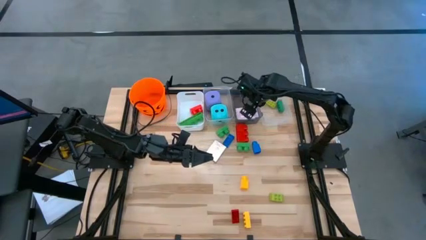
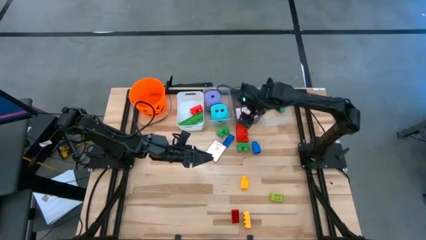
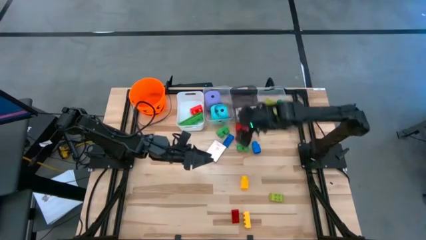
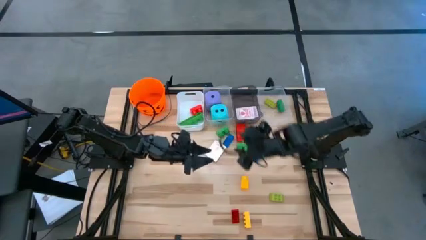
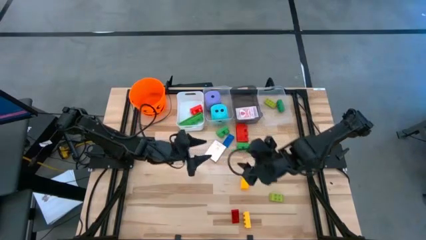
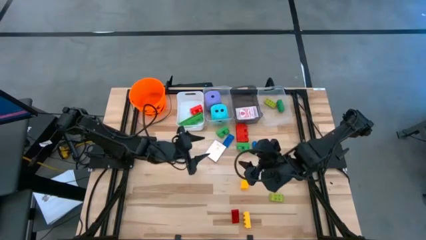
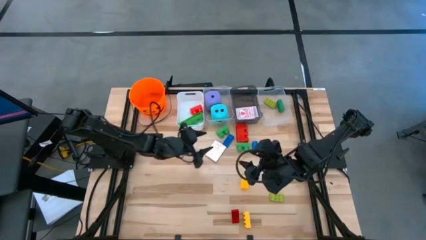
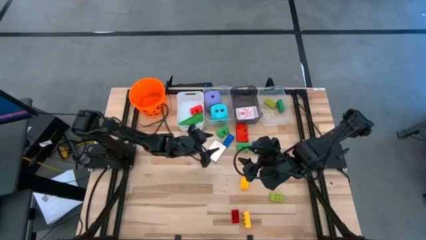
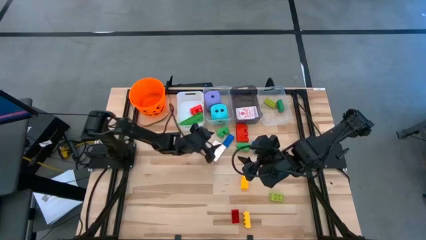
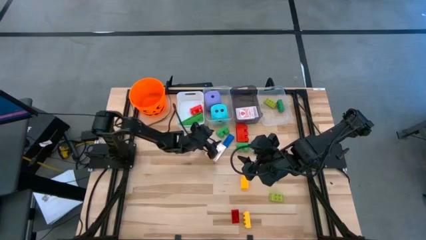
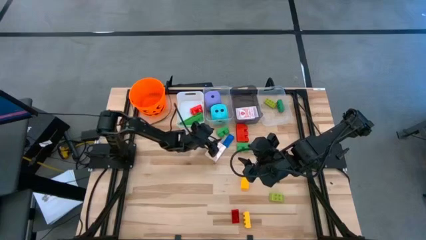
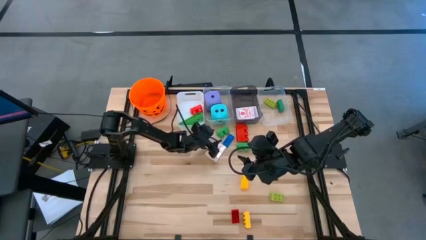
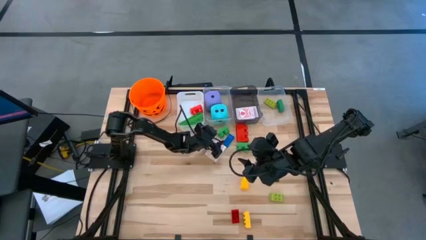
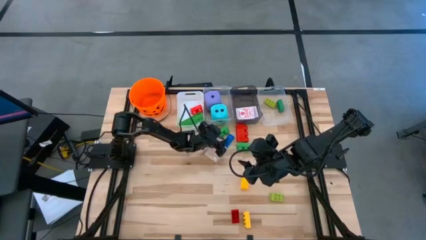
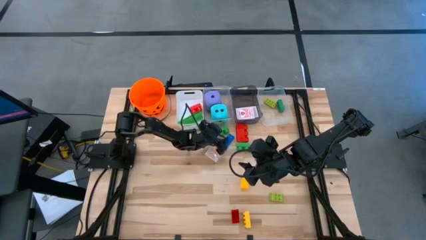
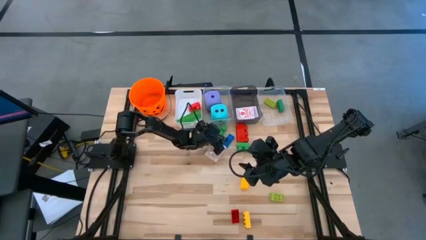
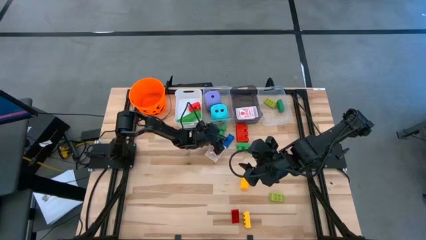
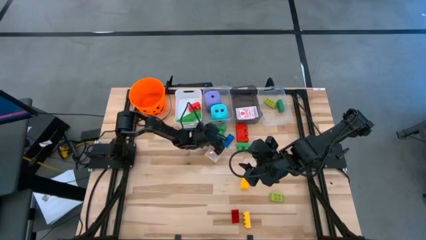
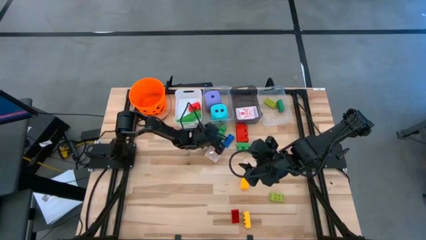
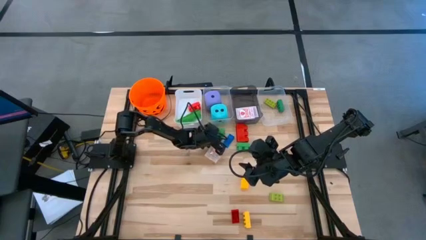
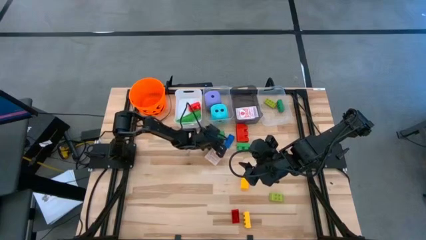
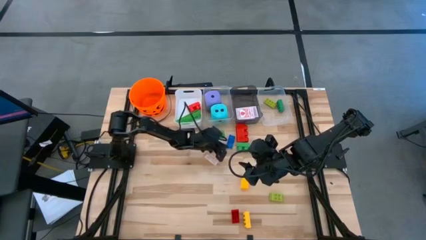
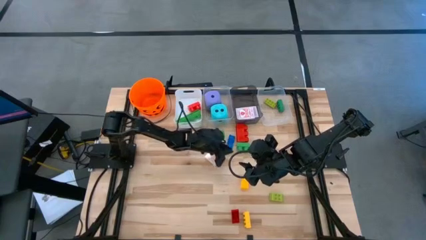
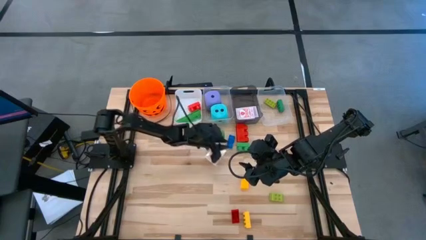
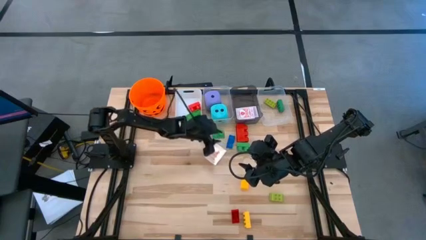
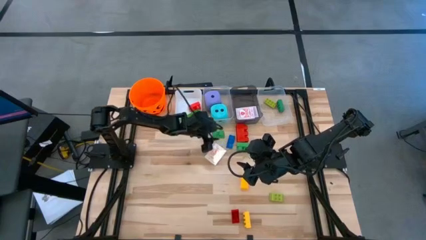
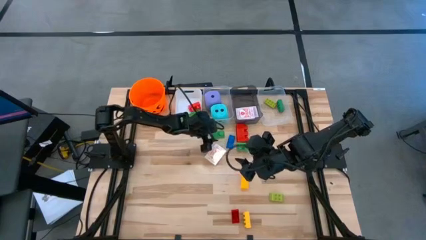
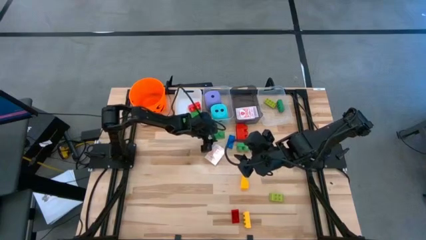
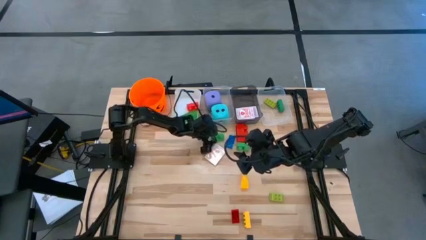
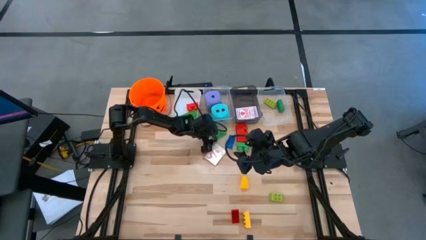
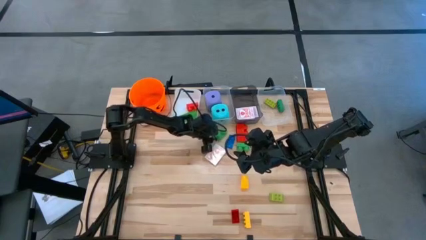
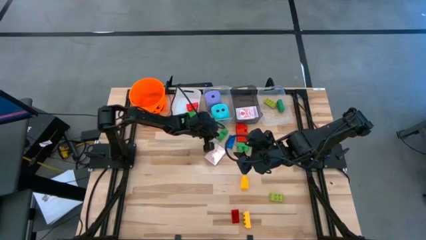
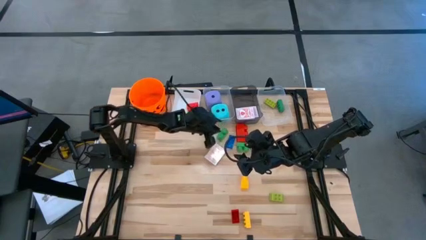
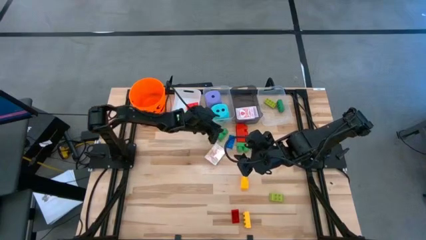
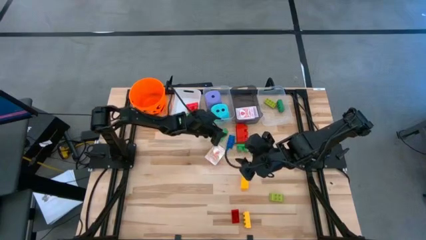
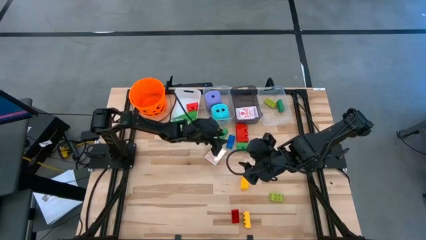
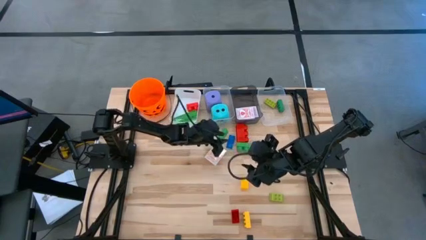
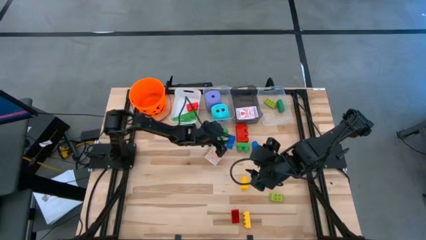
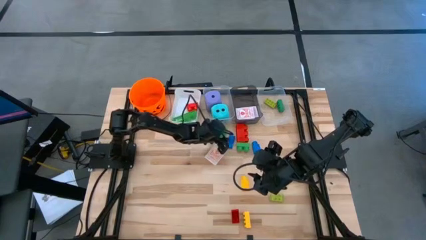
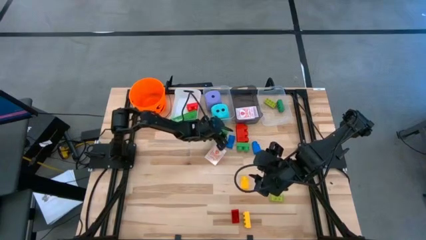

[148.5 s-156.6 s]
Task: Pick & Place Toys
Put the 2 stud green game piece into the white bin

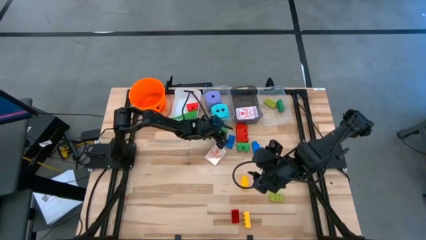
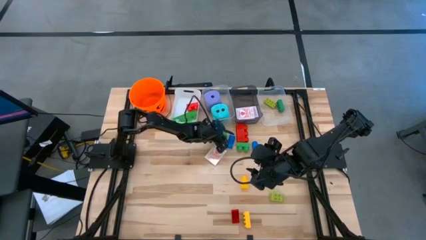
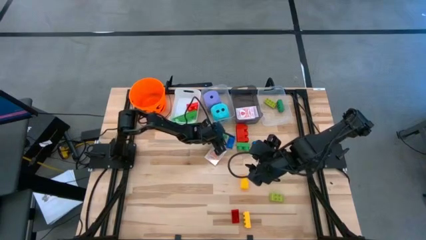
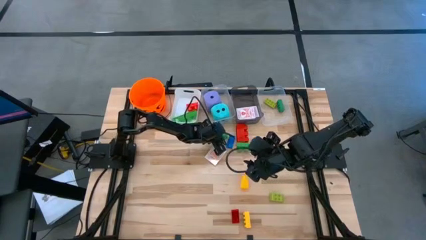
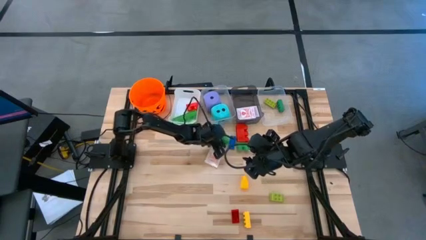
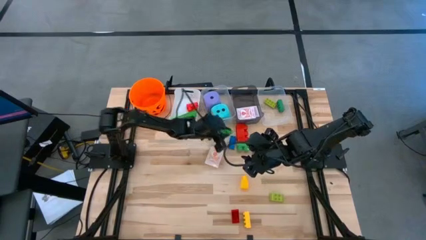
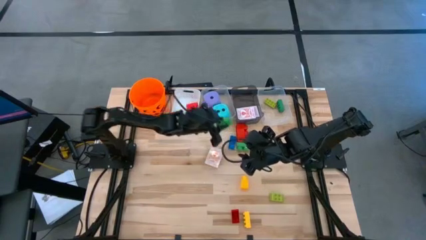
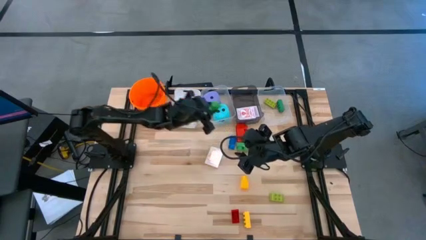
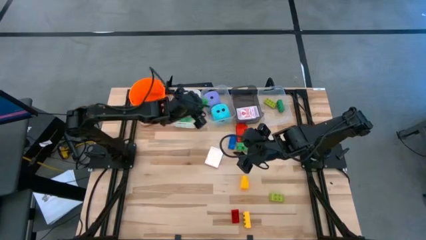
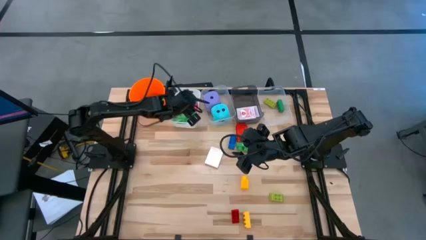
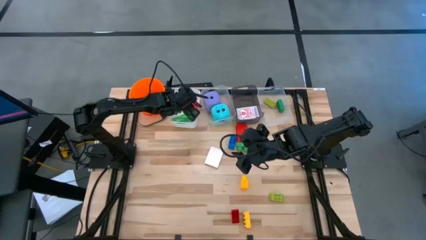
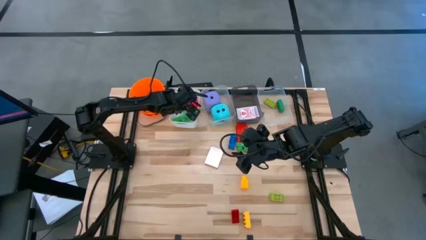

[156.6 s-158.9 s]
Put the 2 stud green game piece into the white bin

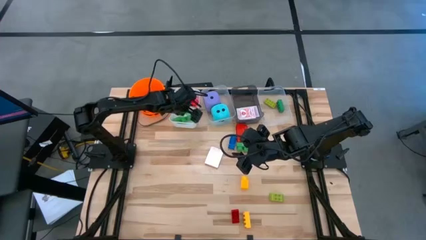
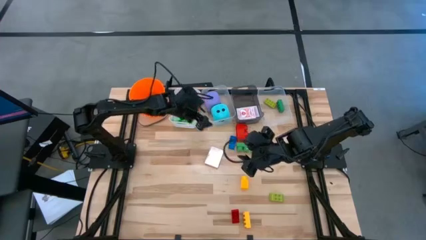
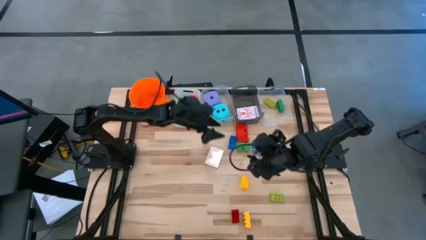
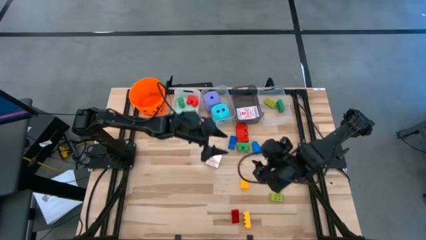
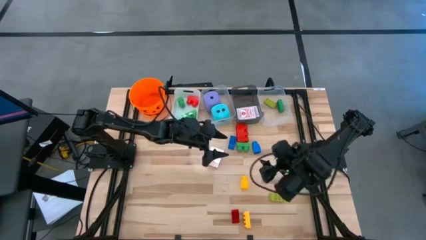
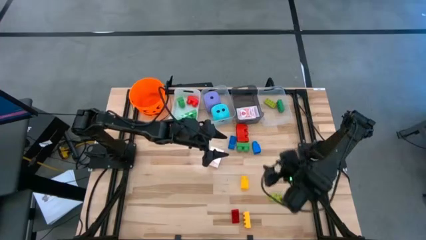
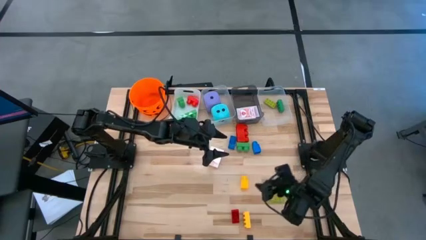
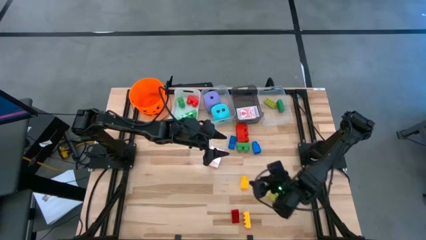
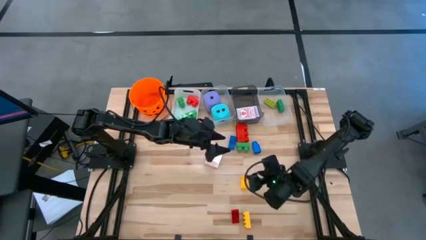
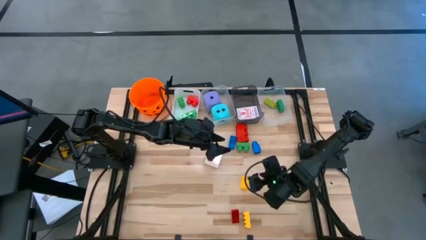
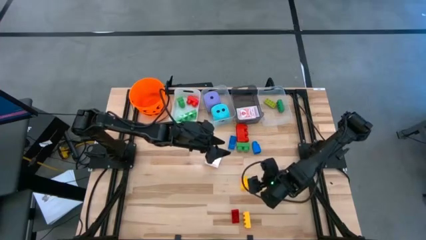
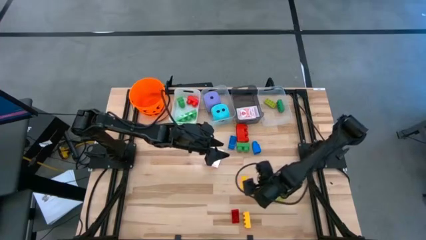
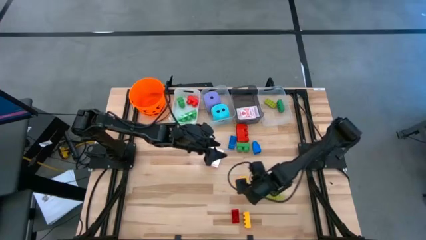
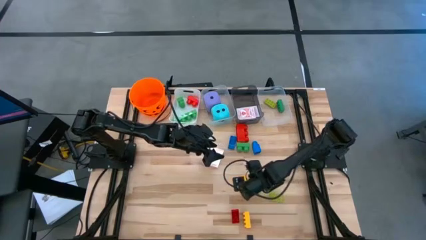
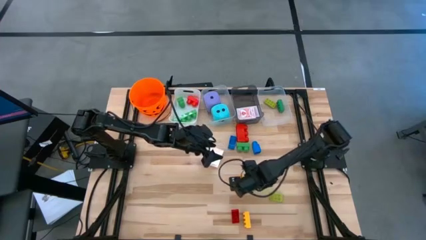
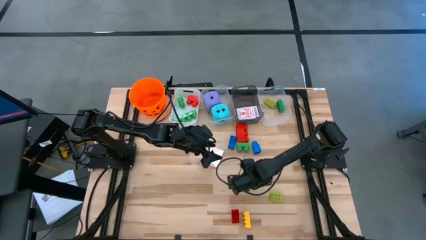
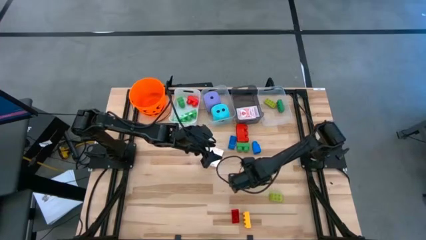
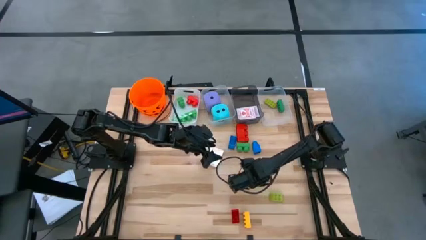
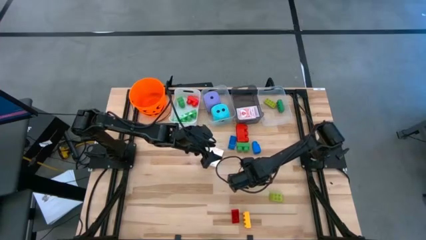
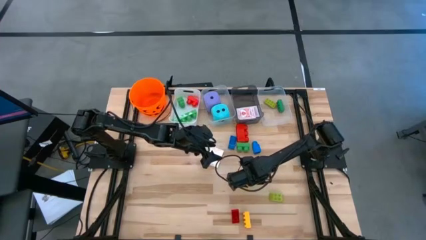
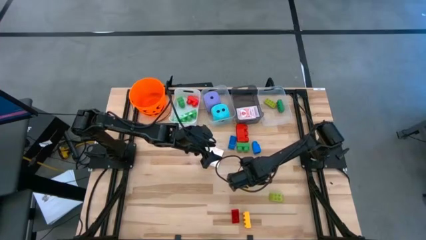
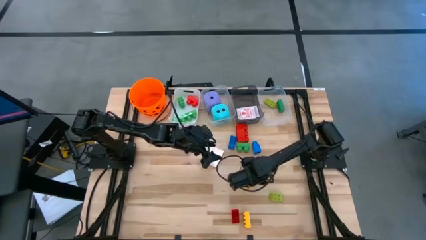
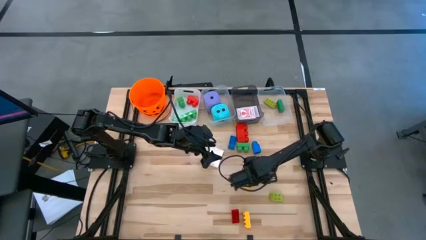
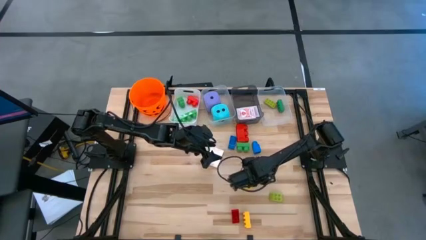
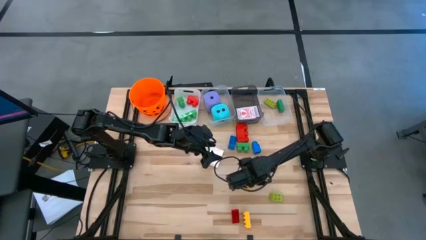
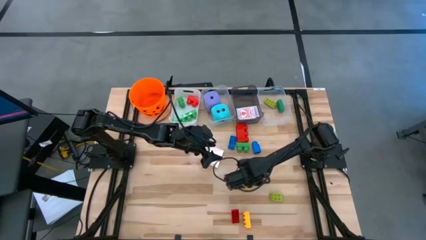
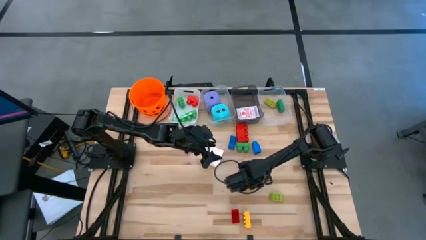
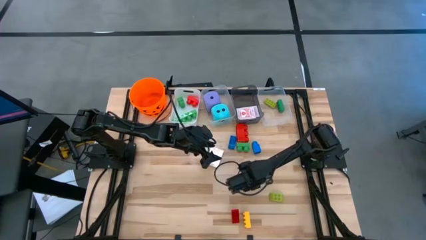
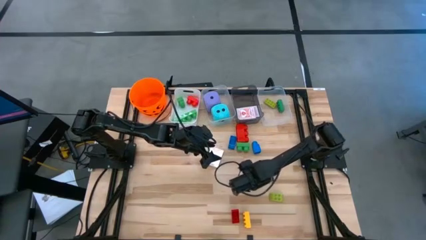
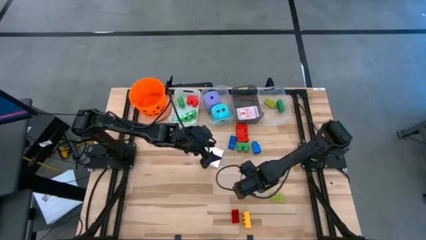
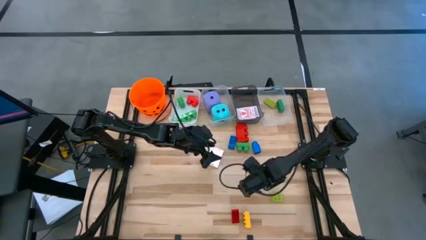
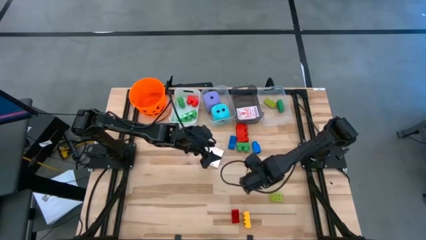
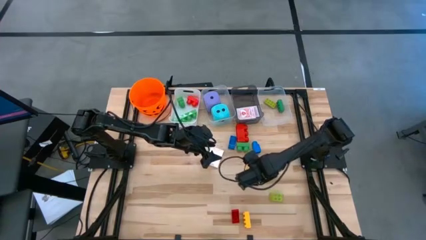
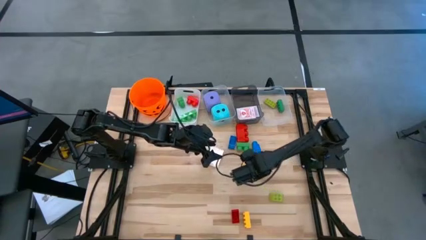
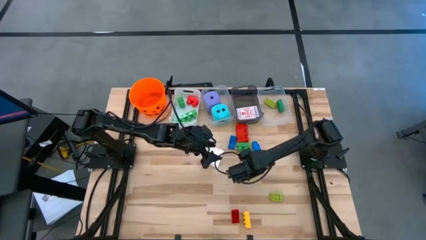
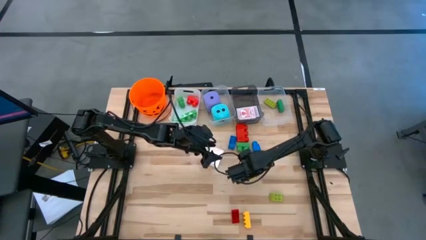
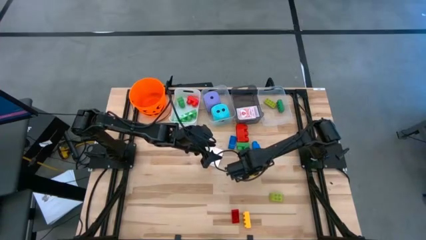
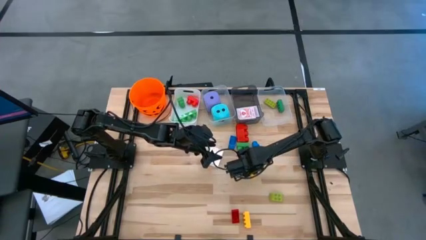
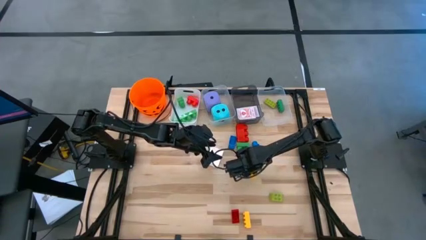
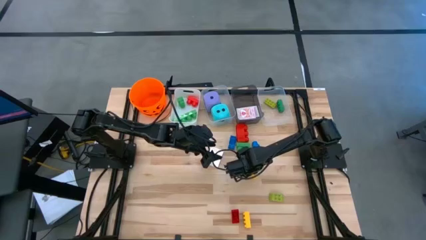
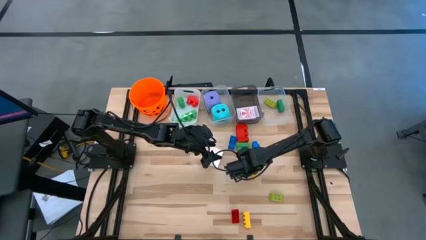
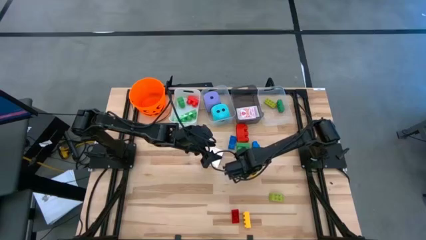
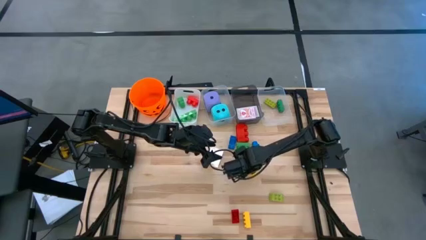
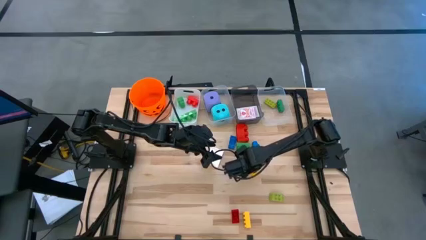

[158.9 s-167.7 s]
Put the 1 stud yellow game piece into the white bin
